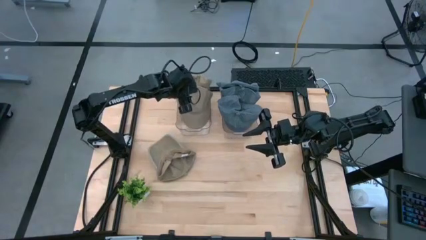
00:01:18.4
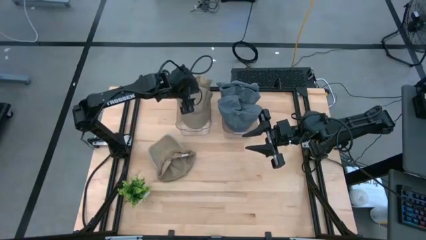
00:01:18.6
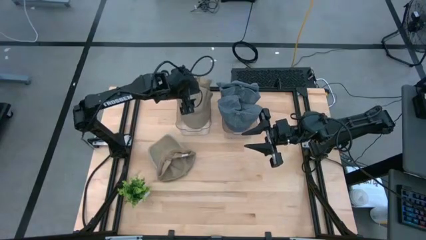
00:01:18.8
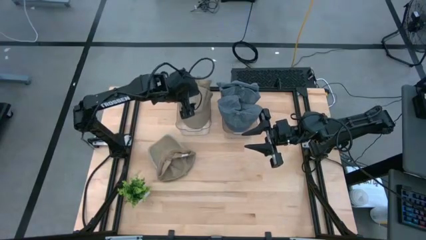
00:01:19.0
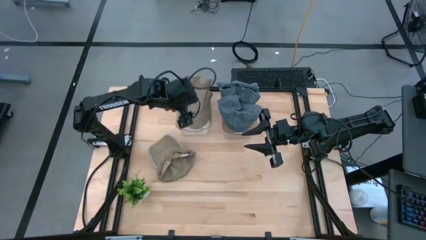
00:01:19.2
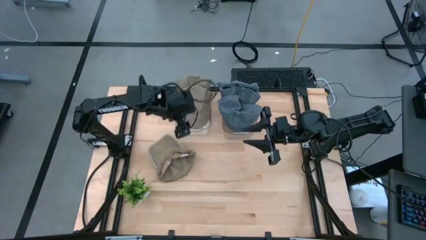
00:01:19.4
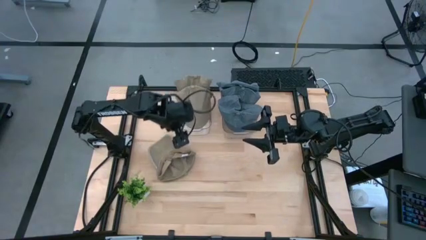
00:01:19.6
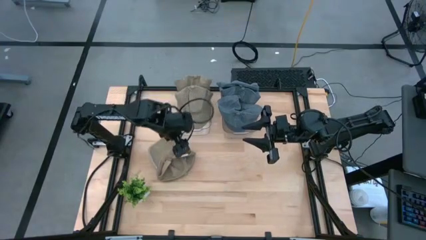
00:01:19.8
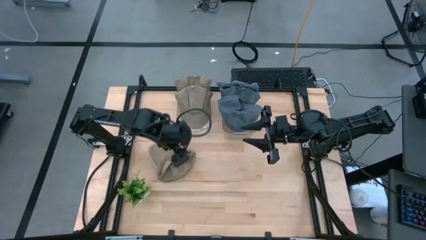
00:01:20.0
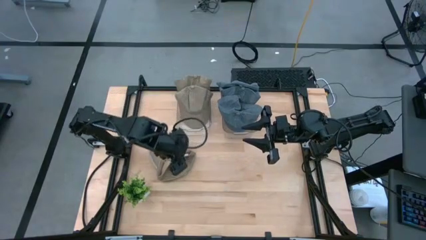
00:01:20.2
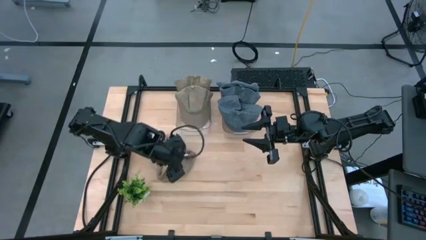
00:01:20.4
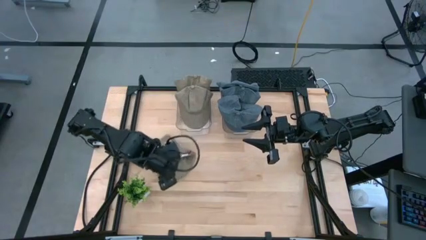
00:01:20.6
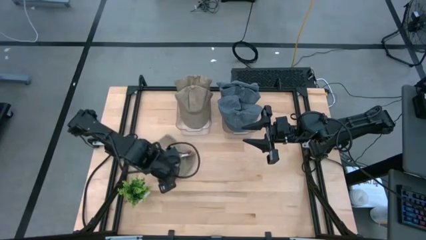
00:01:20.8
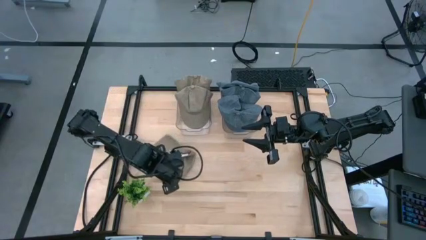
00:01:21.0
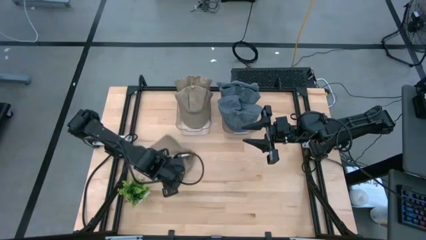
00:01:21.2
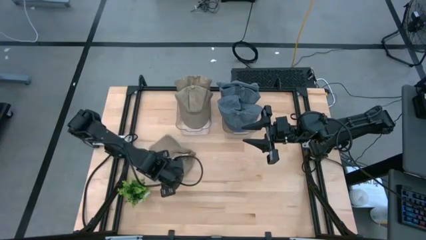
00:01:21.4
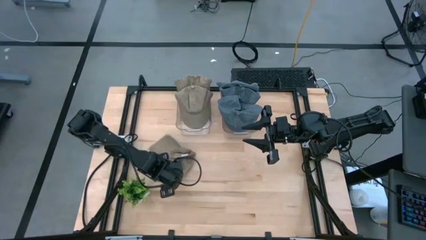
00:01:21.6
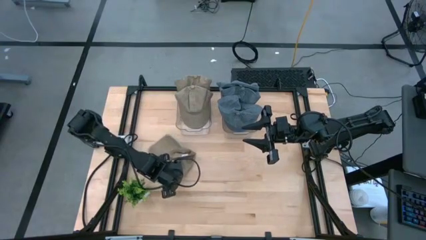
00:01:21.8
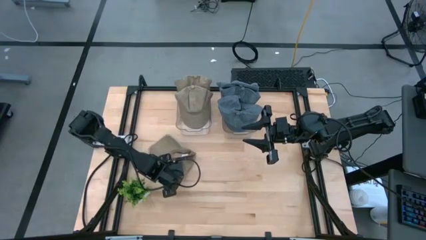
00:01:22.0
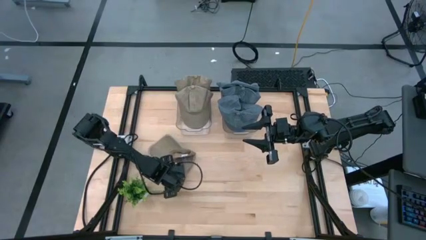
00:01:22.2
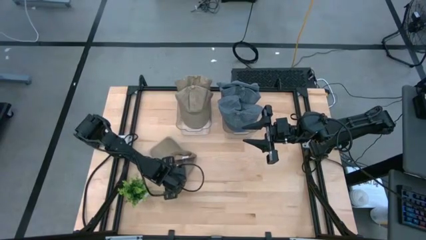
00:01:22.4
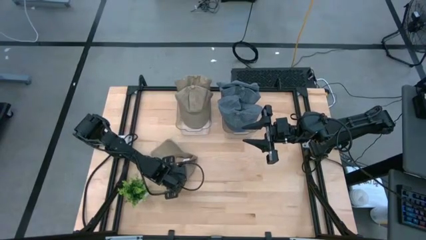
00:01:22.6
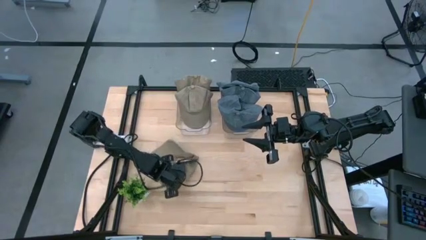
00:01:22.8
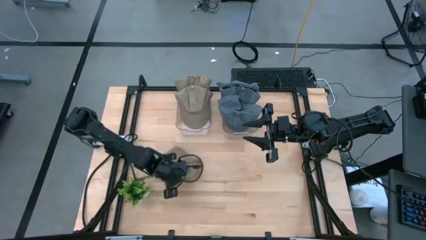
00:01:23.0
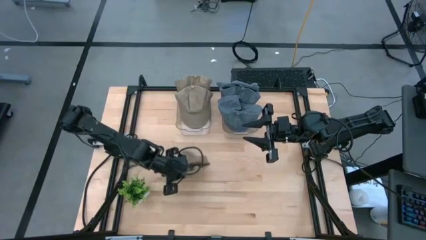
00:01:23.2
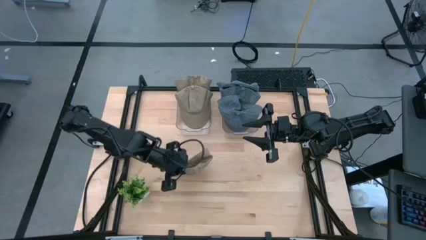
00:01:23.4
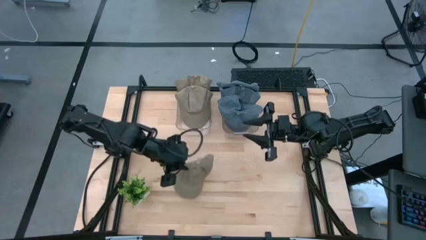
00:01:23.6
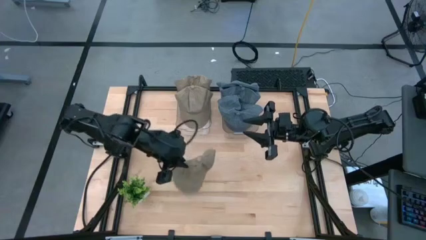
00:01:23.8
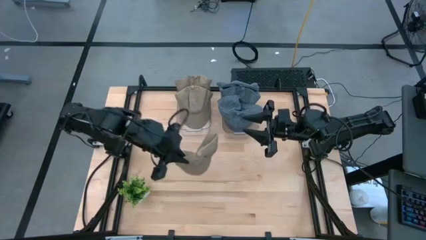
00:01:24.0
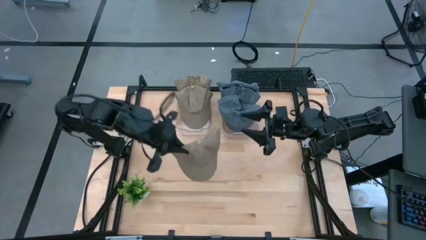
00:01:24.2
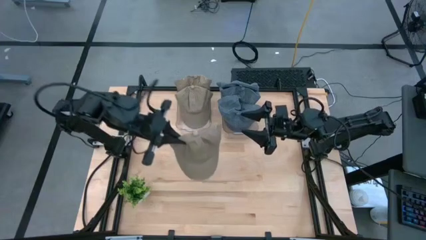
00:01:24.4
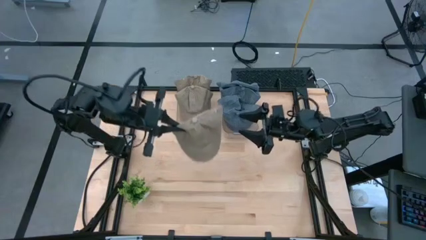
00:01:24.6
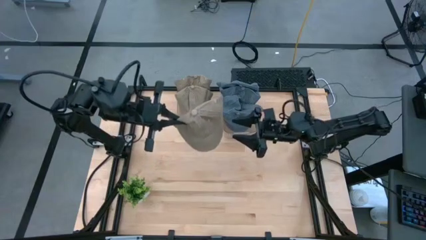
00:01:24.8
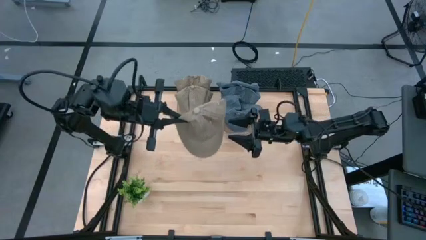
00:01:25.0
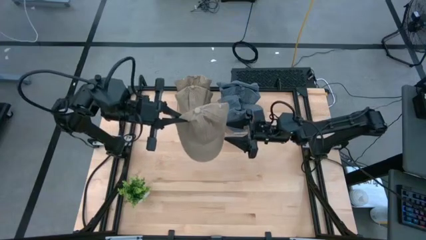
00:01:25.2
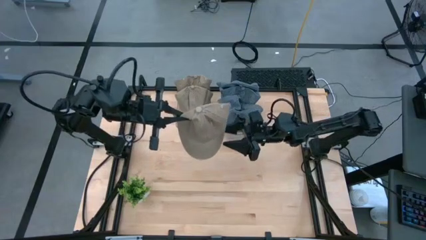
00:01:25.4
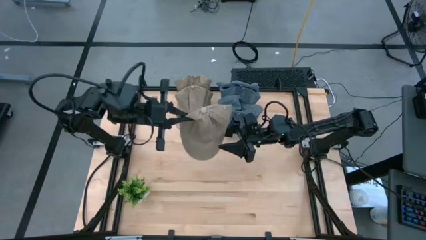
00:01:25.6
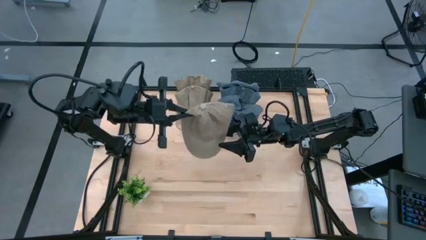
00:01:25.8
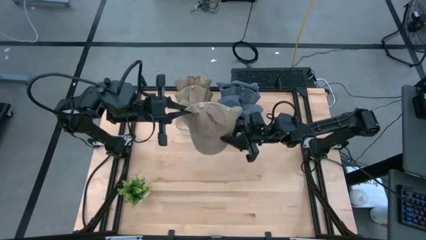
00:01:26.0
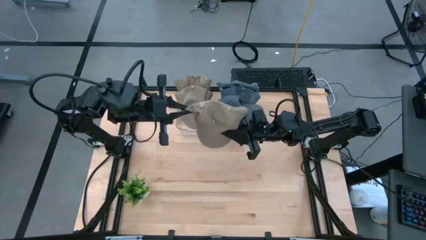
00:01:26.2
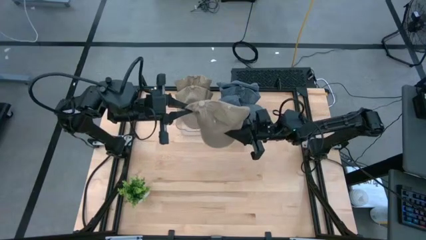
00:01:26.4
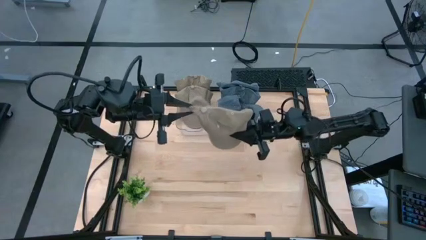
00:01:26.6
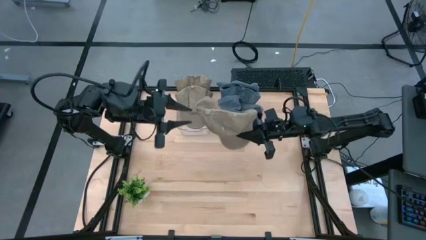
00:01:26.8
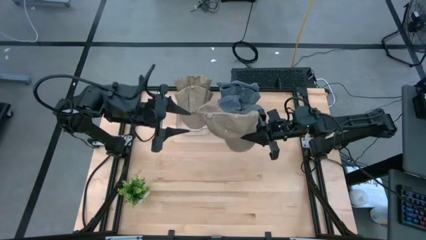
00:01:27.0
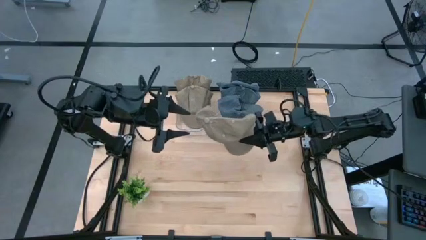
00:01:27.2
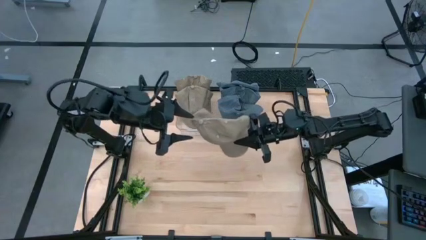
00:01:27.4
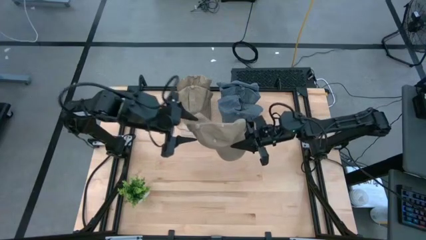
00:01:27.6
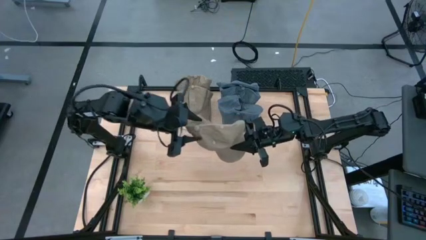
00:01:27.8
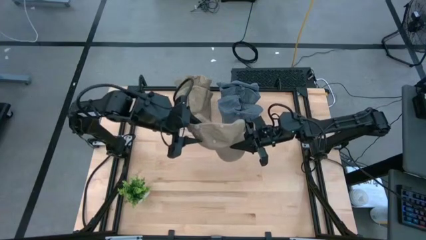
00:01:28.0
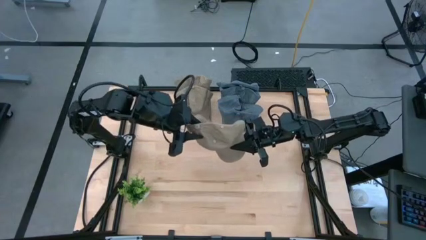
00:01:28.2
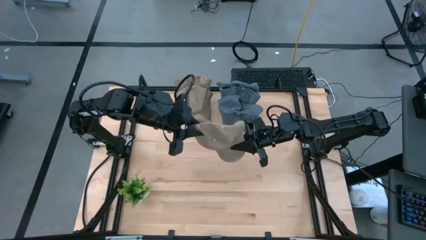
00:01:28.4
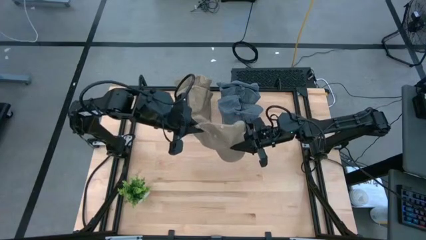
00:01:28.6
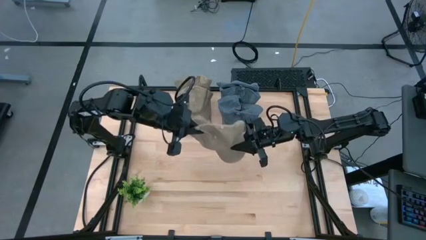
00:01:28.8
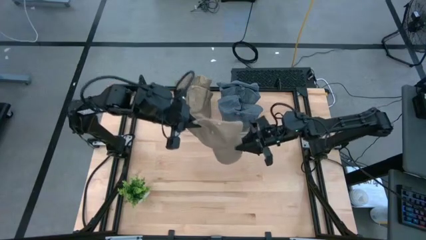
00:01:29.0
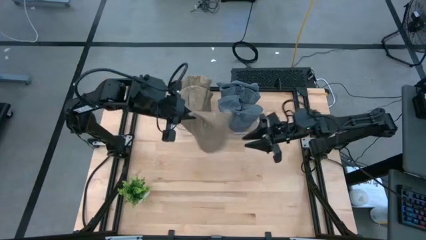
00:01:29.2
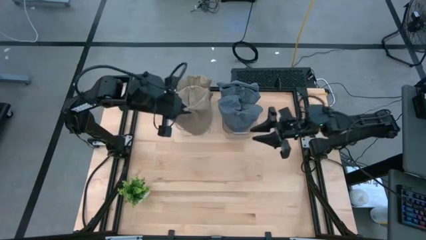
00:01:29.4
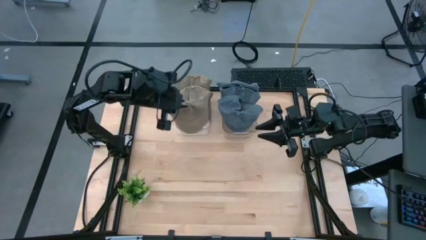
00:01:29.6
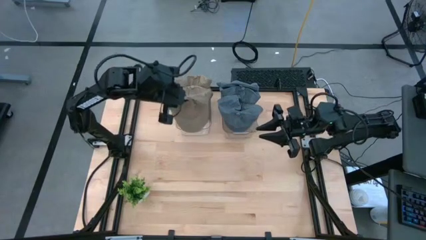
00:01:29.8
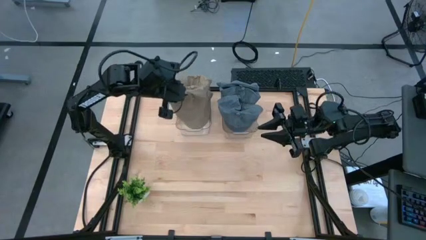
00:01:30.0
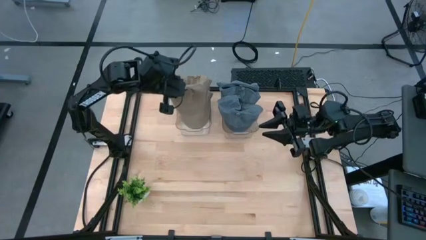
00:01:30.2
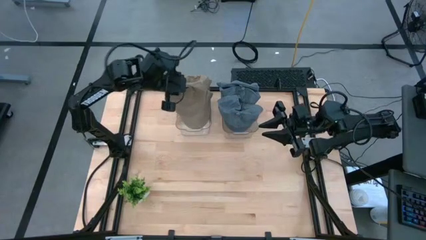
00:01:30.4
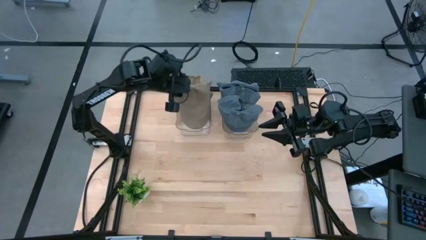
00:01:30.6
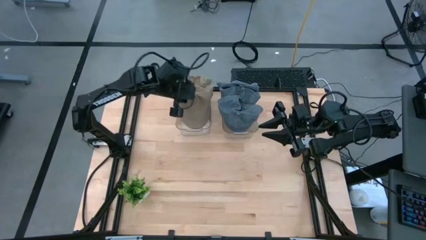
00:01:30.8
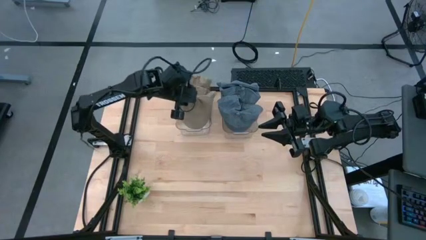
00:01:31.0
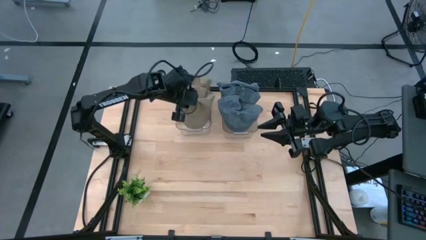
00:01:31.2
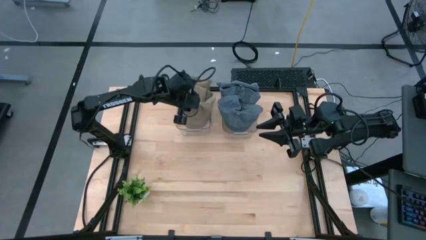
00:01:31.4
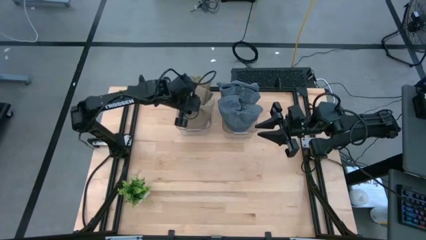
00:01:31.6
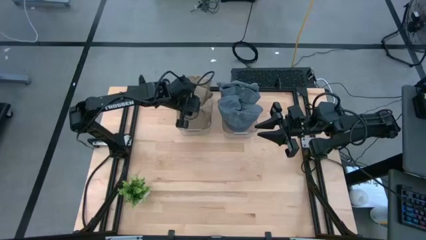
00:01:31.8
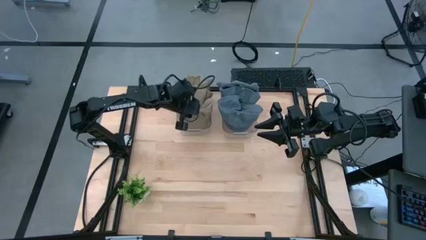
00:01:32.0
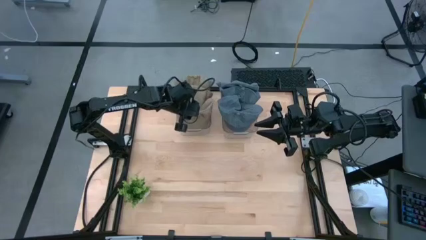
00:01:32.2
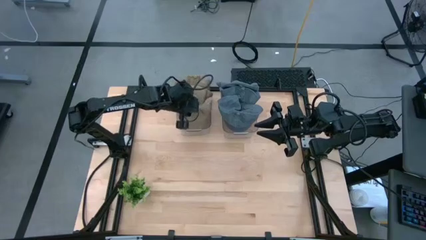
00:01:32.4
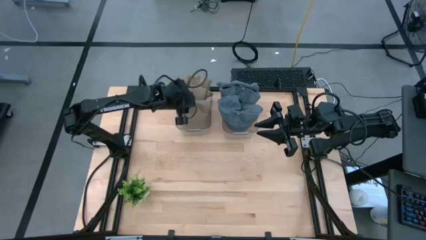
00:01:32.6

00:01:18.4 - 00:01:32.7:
Task: Pick & Place hat
Put the brown cap into the left transparent bin

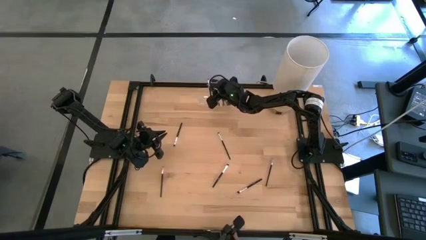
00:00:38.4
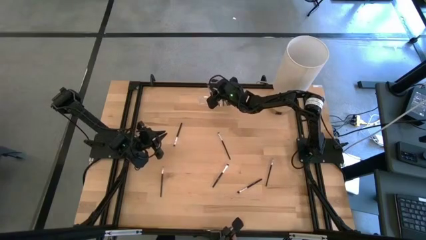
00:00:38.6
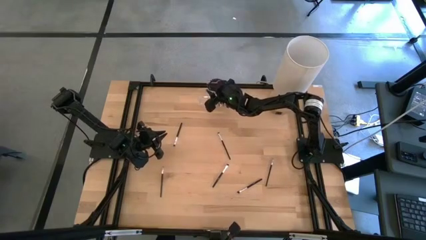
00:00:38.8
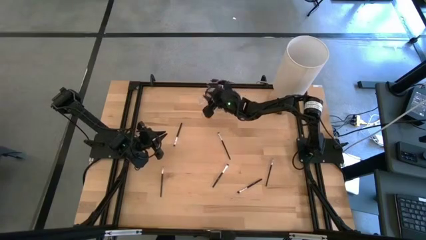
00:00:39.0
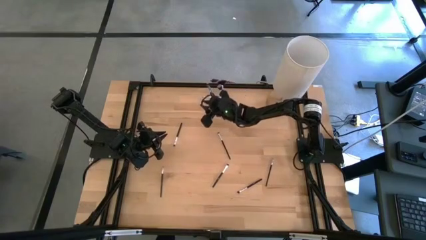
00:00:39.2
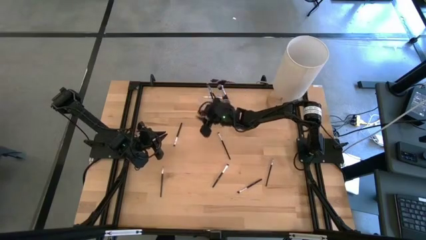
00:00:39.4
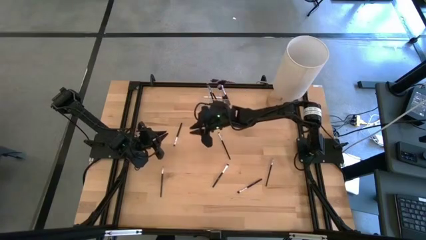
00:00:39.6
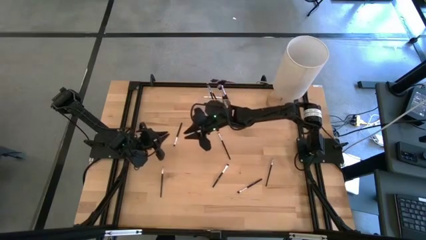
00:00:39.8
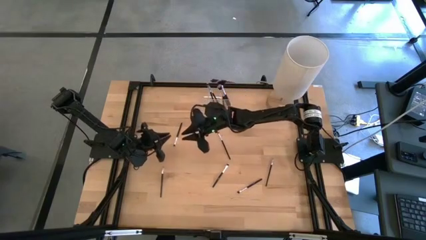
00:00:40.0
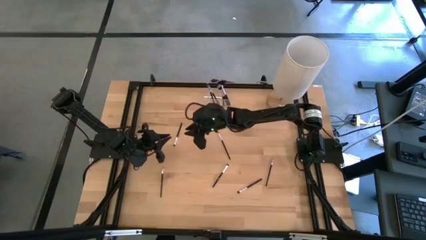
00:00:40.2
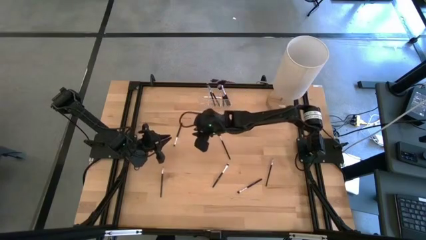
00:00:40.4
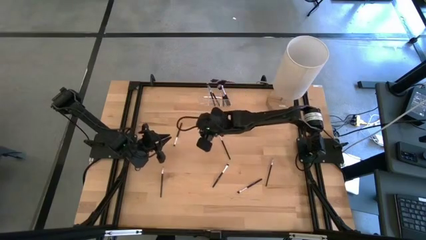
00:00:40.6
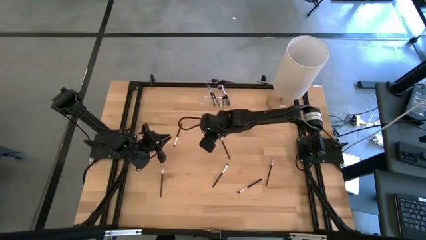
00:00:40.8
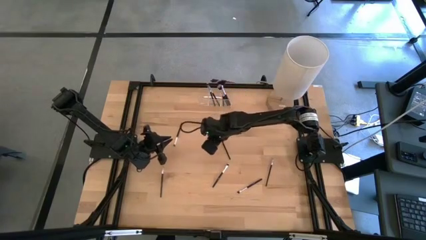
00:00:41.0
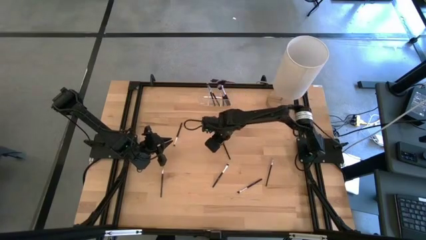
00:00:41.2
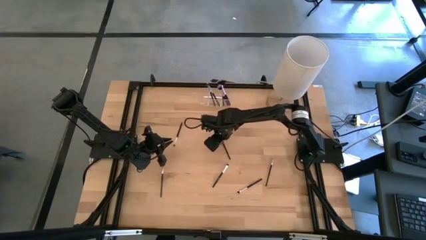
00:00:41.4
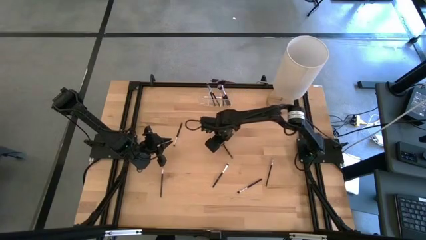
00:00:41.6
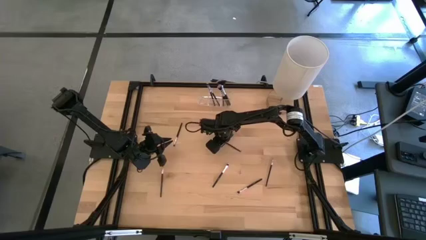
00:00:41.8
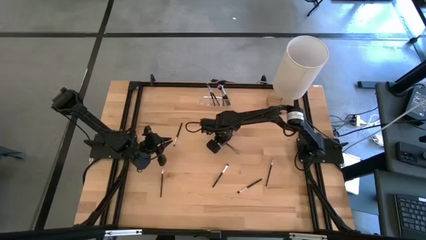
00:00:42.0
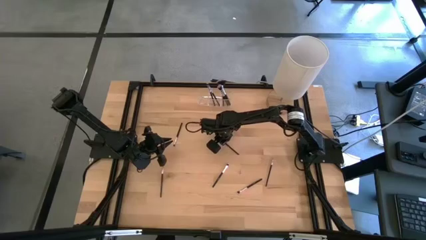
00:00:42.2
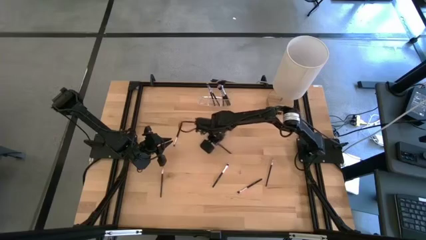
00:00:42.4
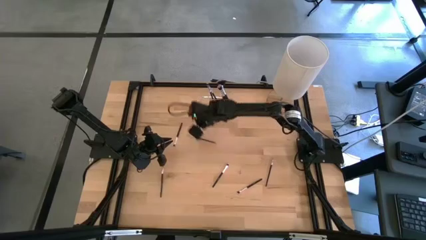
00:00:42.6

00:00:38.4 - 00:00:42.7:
Task: Put items in baskets/containers
Put the black eyeshadow brush into the transparent organizer
